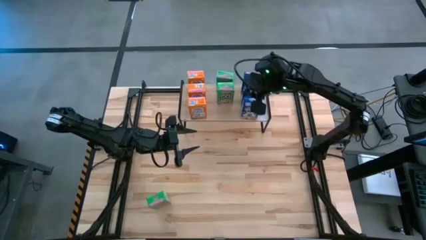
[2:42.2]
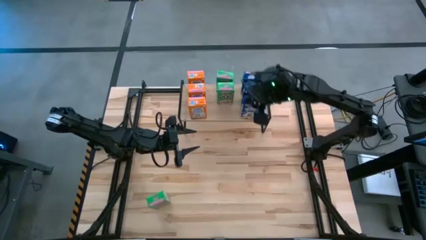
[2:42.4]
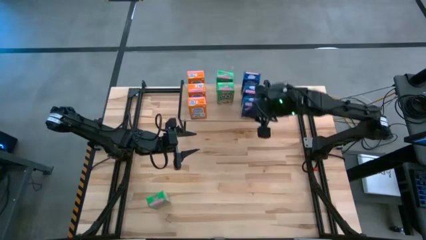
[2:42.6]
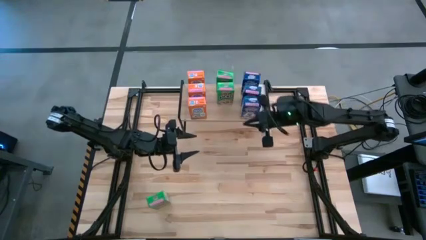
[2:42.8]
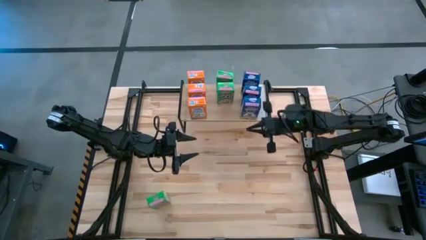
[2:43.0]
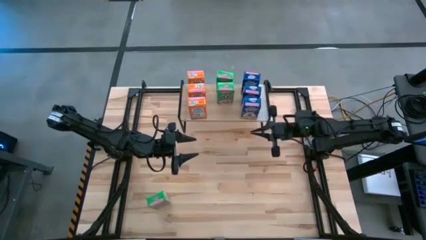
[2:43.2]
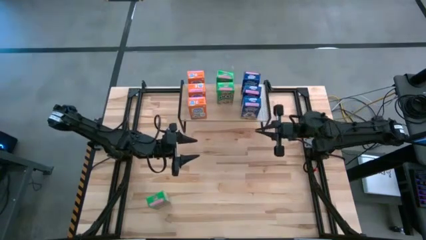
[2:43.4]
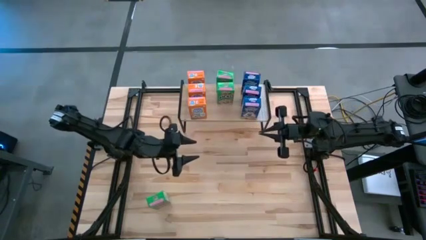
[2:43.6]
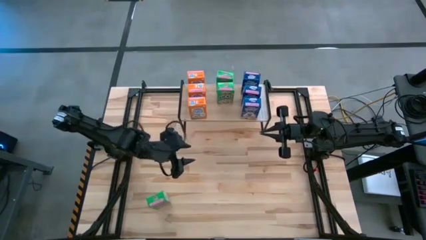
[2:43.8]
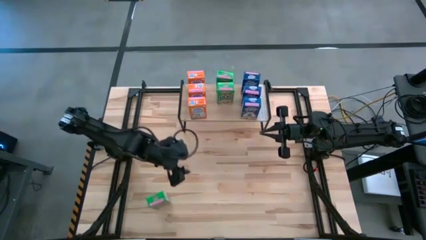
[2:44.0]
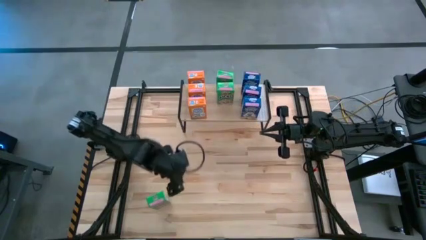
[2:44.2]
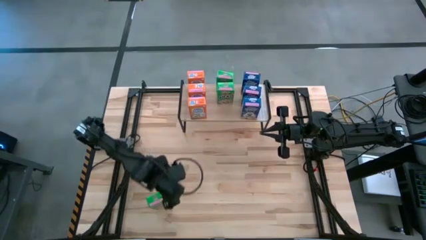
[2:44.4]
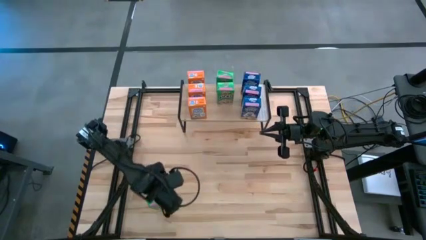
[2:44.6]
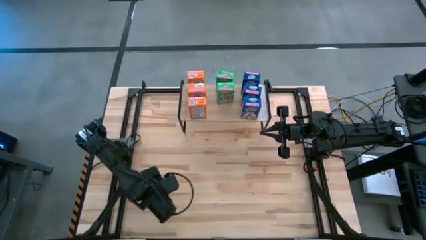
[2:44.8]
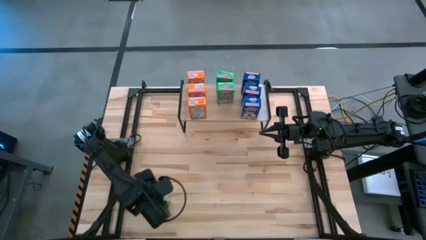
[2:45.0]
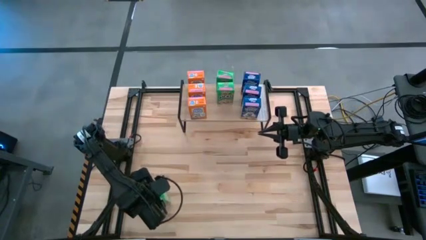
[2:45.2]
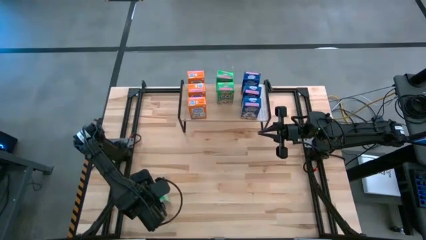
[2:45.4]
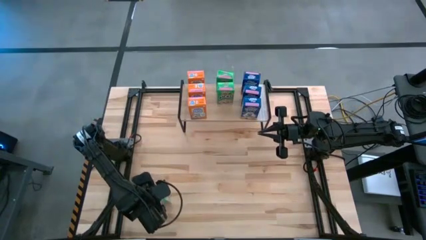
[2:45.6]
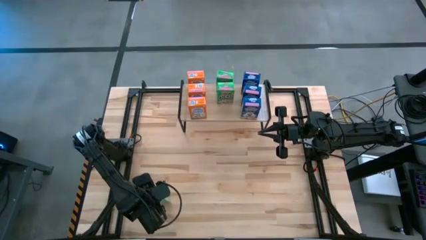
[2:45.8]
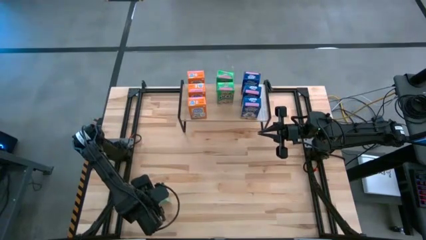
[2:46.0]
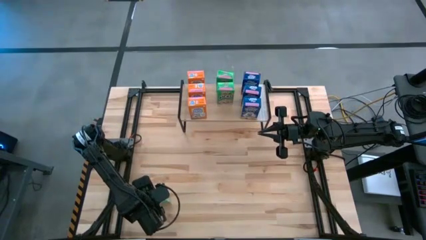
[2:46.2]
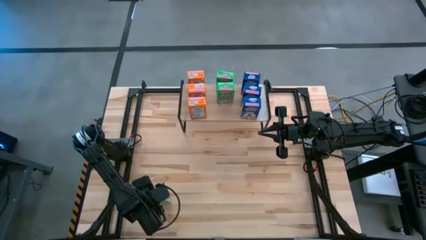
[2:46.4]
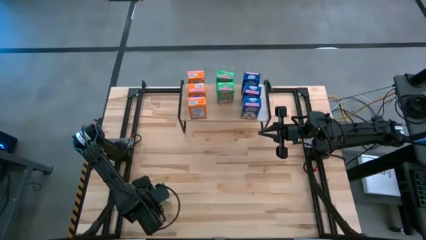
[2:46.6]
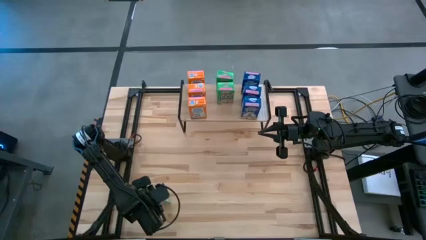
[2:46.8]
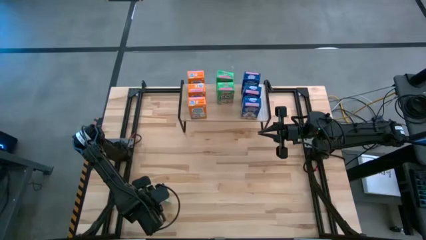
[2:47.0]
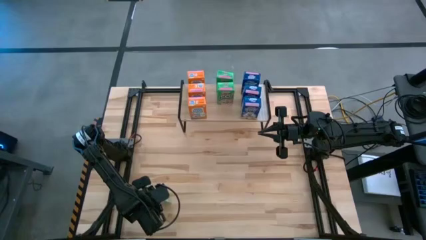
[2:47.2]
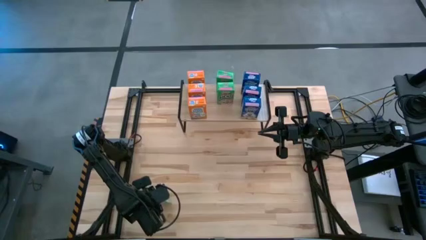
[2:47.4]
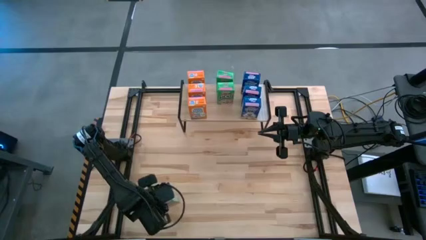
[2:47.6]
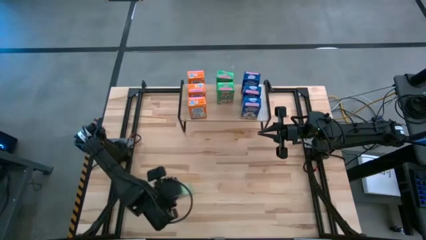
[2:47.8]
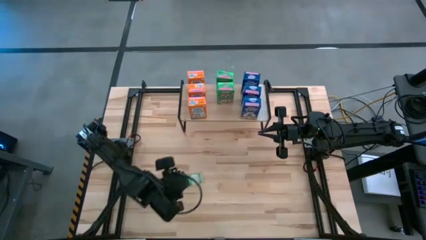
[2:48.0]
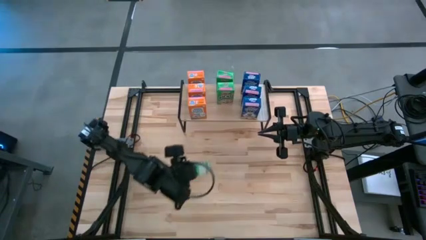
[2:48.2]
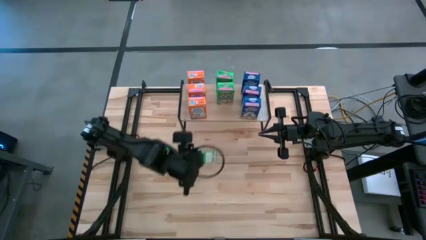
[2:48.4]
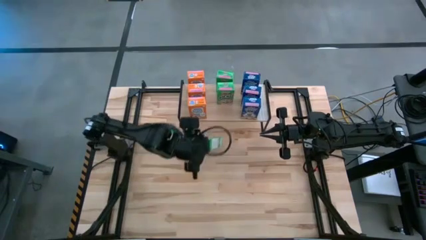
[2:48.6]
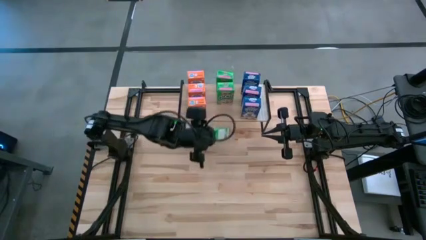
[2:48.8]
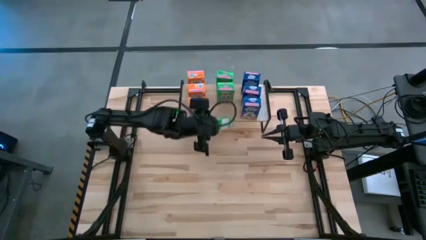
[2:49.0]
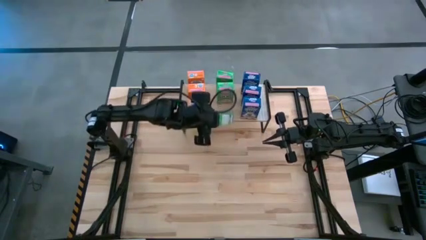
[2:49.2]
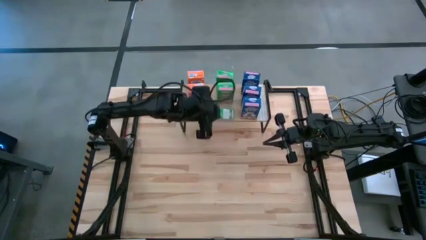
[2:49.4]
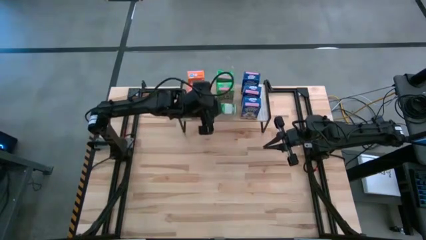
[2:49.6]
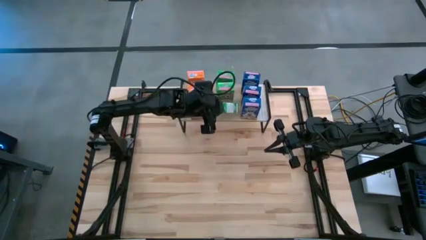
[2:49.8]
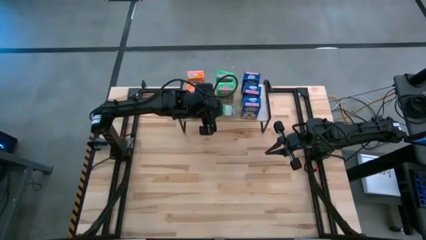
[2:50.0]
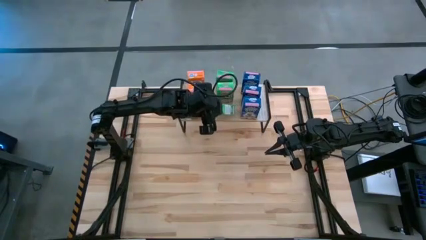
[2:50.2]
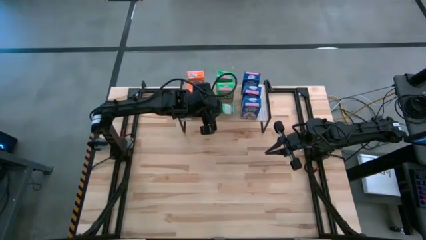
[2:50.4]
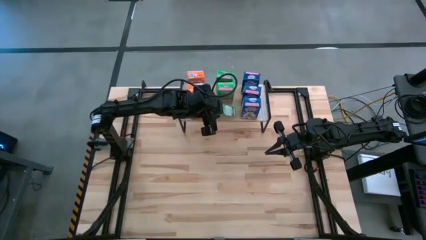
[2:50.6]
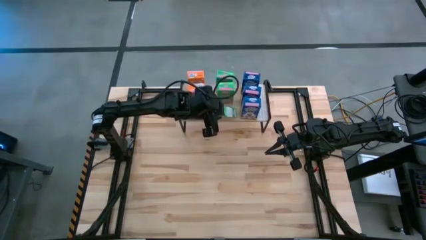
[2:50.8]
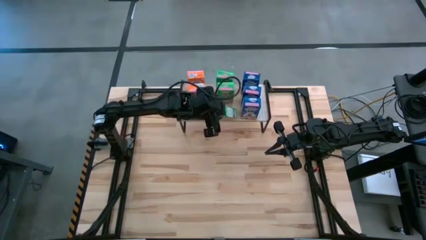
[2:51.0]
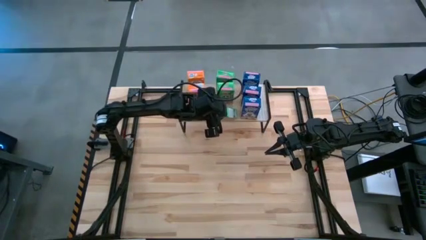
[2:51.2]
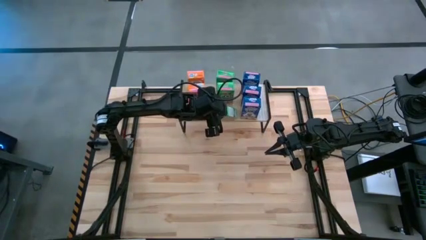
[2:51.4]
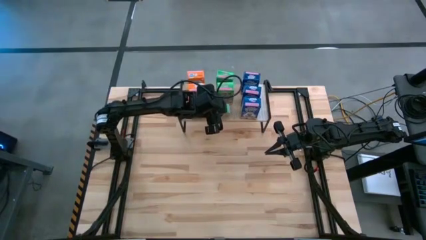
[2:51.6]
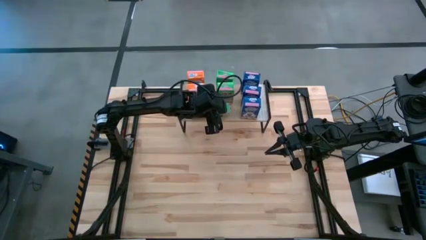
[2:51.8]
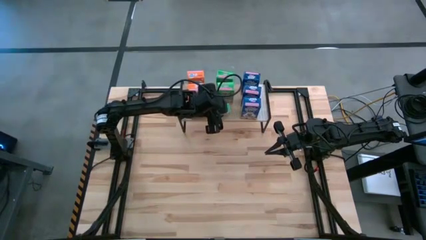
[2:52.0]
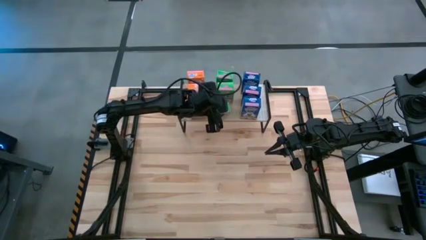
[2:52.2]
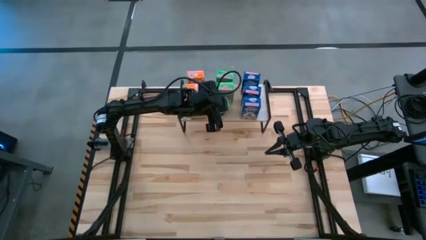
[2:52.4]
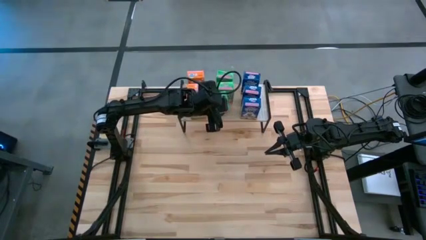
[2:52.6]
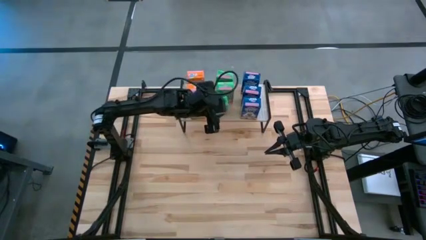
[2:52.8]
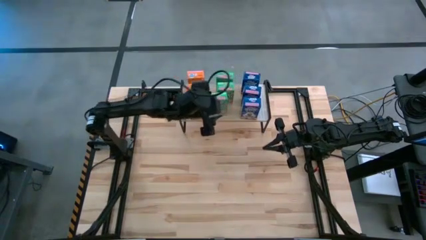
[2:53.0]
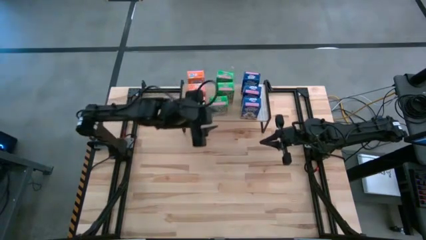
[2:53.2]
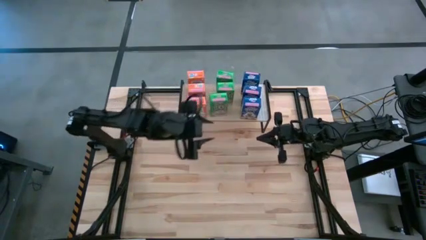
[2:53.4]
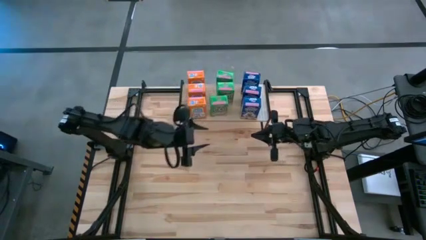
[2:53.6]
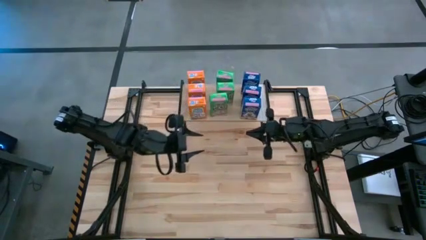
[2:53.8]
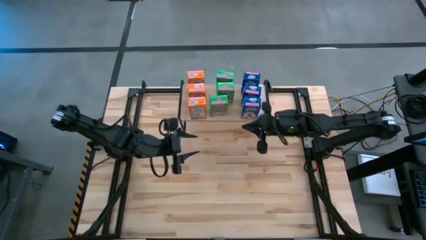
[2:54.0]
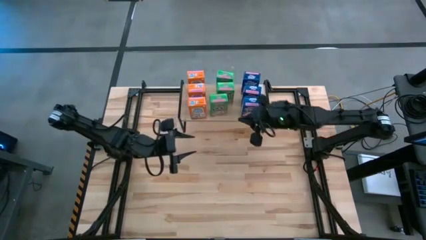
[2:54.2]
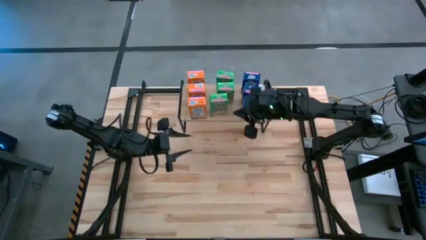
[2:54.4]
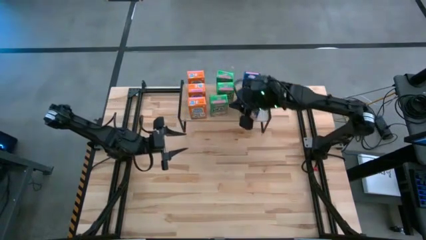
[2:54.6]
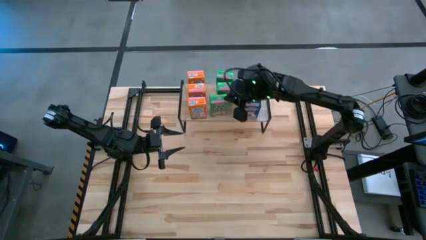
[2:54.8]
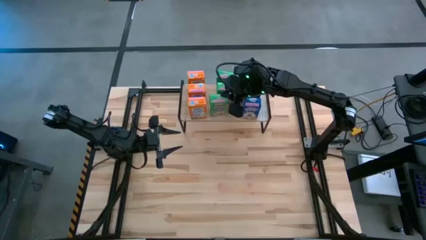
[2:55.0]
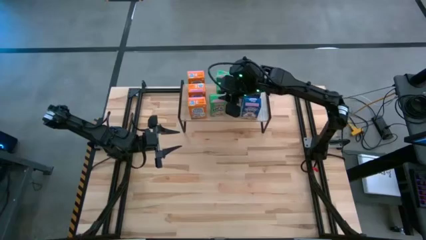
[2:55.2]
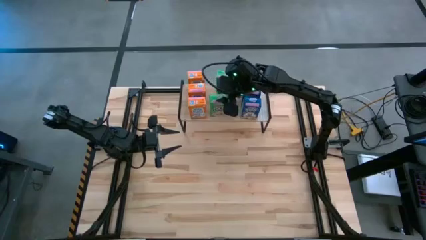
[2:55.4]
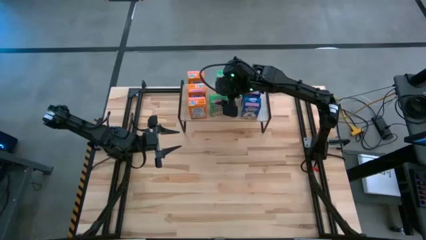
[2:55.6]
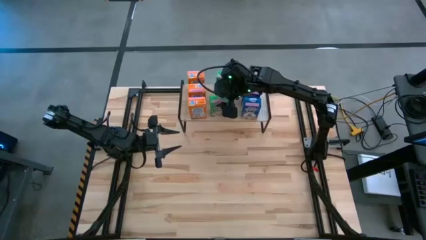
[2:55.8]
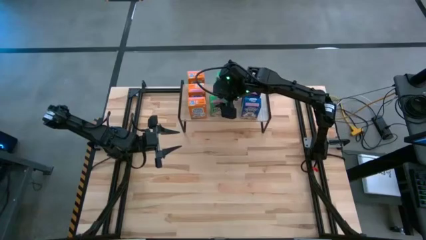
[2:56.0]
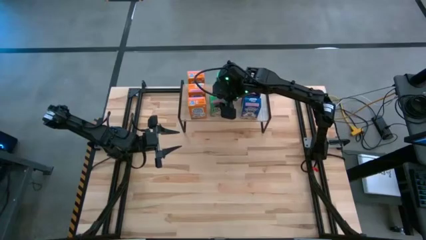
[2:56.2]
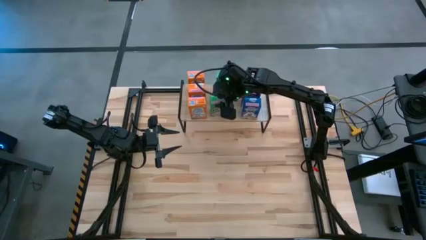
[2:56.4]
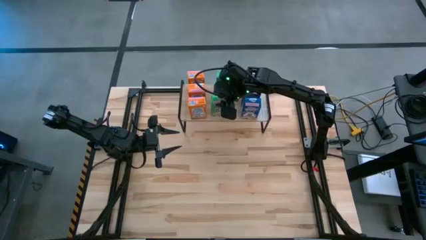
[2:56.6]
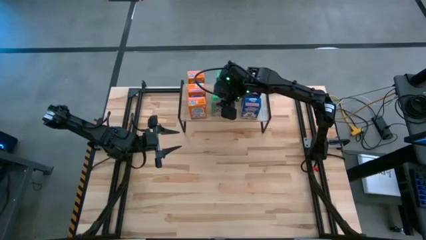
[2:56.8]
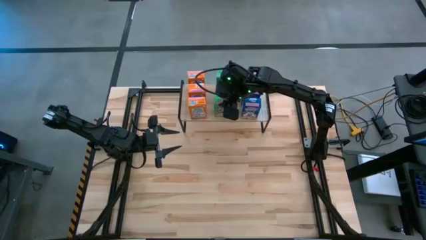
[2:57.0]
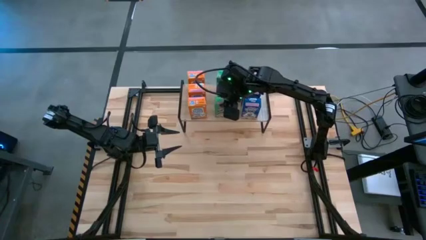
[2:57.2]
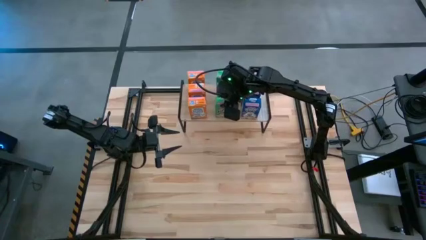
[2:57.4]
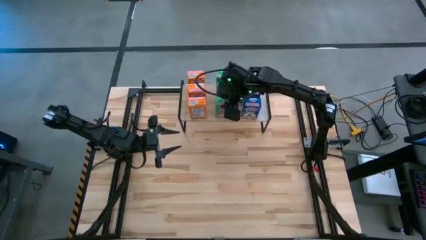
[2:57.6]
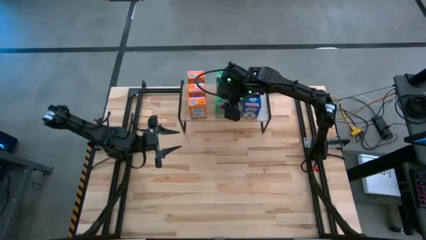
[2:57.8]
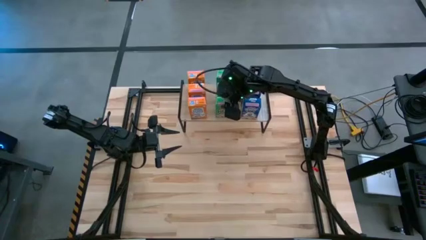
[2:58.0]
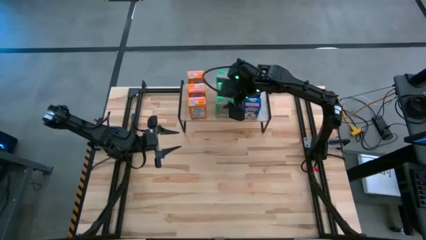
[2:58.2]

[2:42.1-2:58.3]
Task: Stack cereal on shelf
Put the green cereal box aligned with the other green cereal box on the shelf
